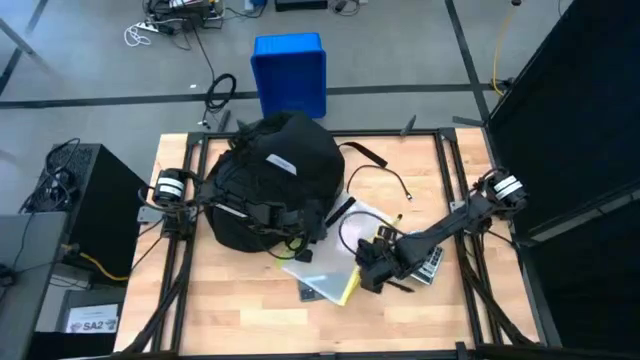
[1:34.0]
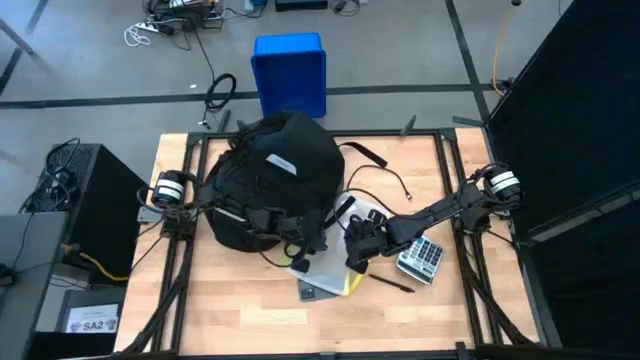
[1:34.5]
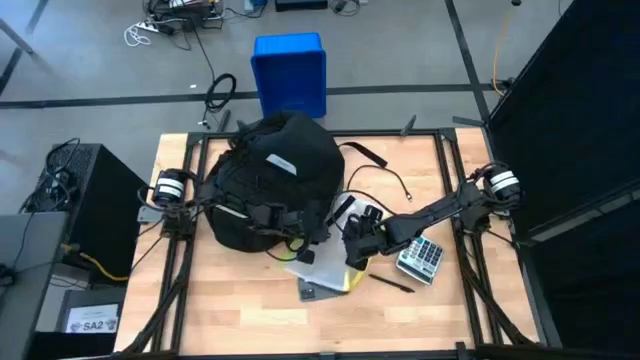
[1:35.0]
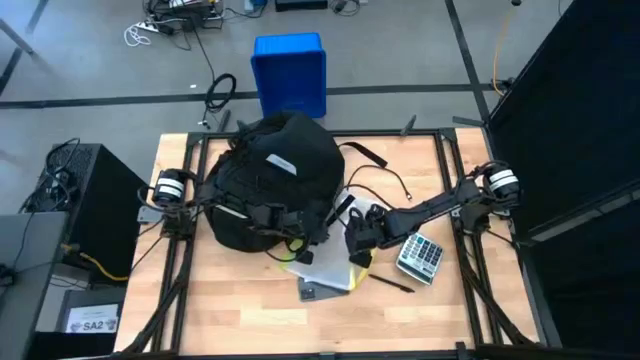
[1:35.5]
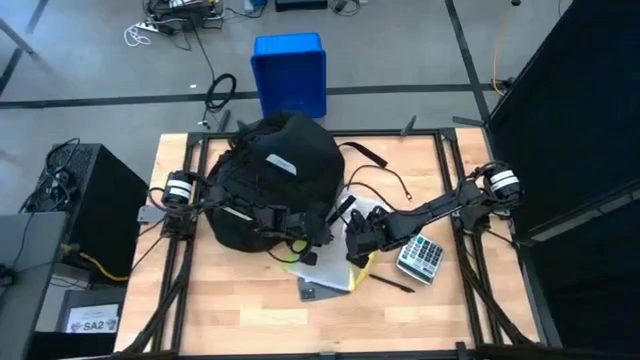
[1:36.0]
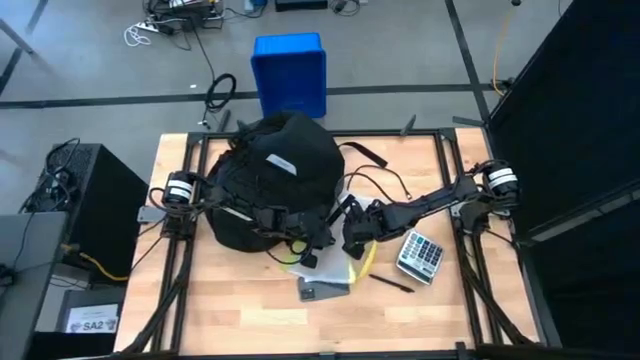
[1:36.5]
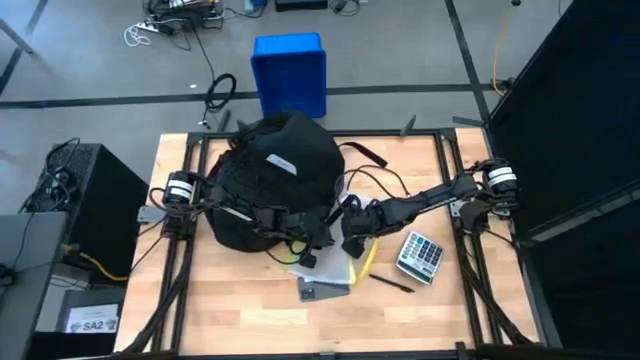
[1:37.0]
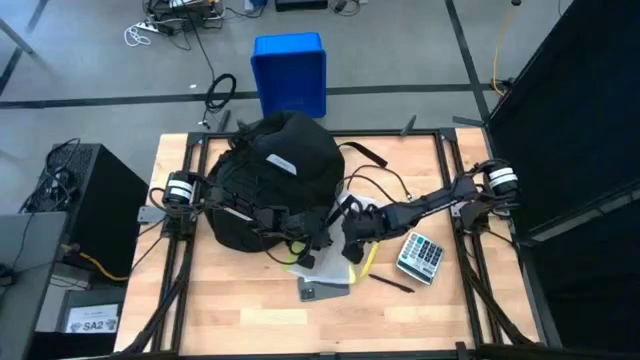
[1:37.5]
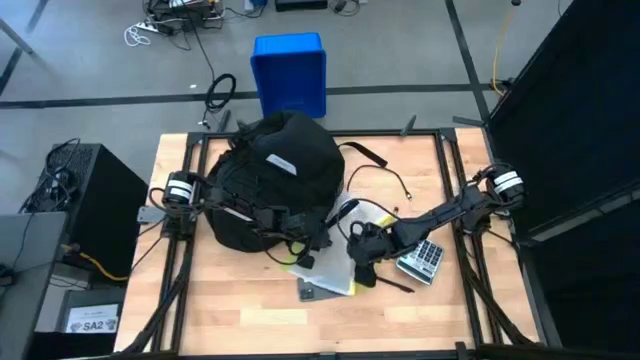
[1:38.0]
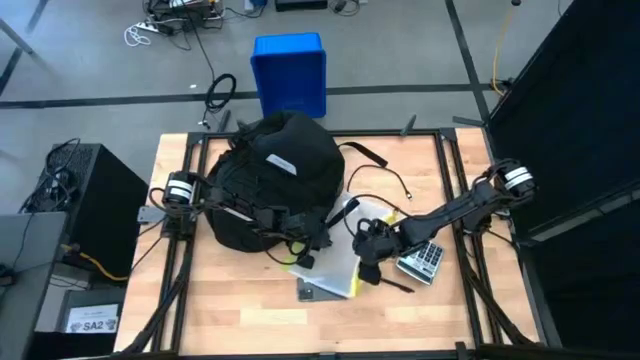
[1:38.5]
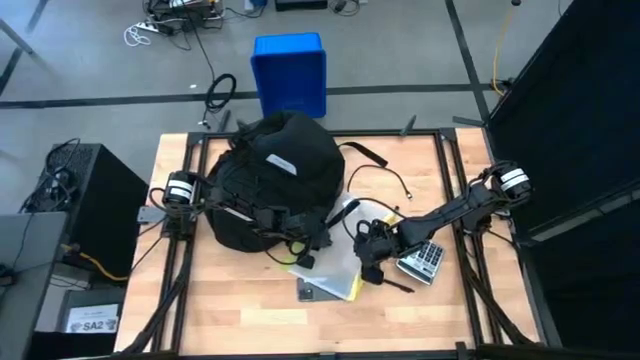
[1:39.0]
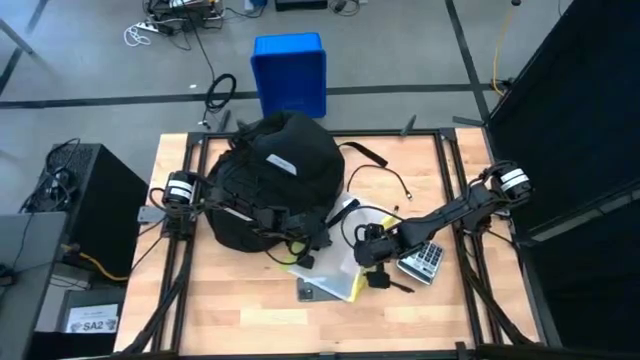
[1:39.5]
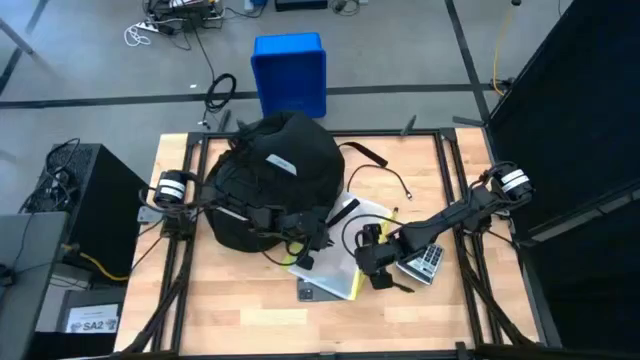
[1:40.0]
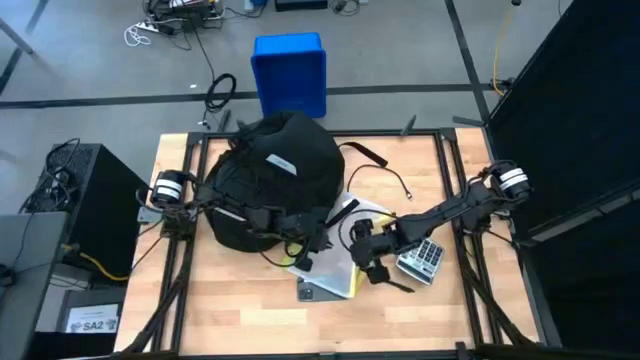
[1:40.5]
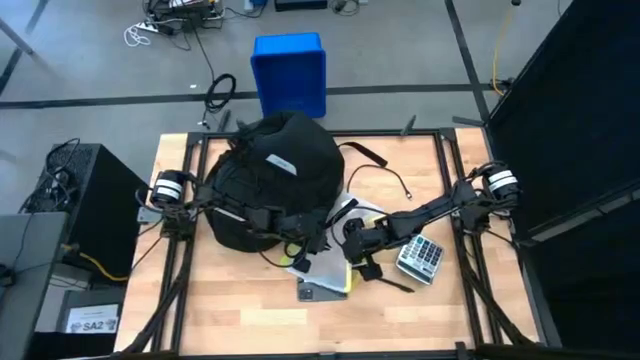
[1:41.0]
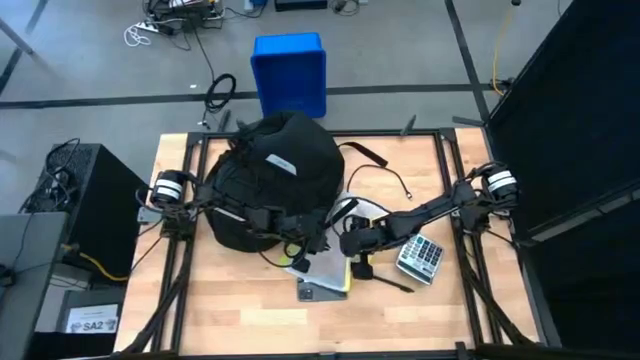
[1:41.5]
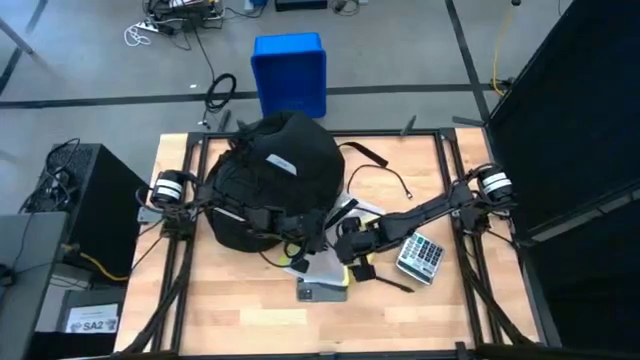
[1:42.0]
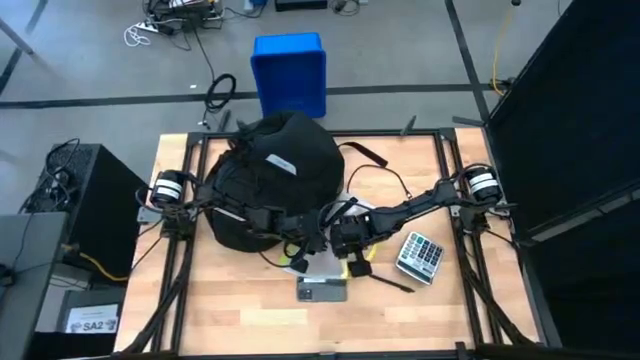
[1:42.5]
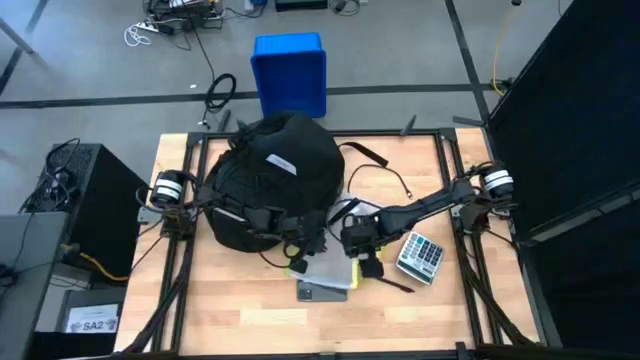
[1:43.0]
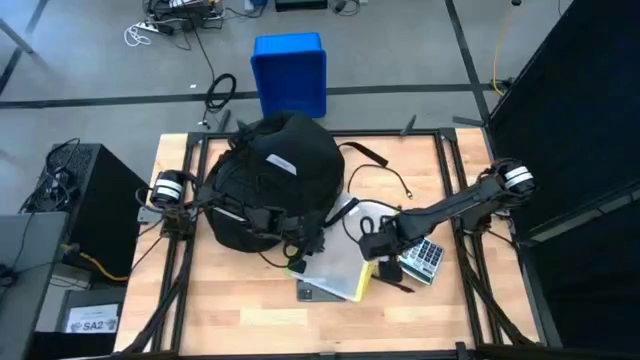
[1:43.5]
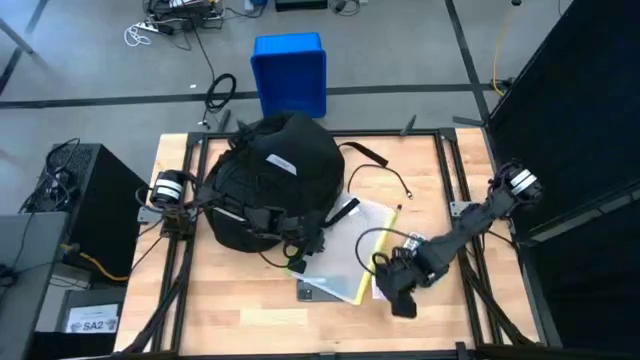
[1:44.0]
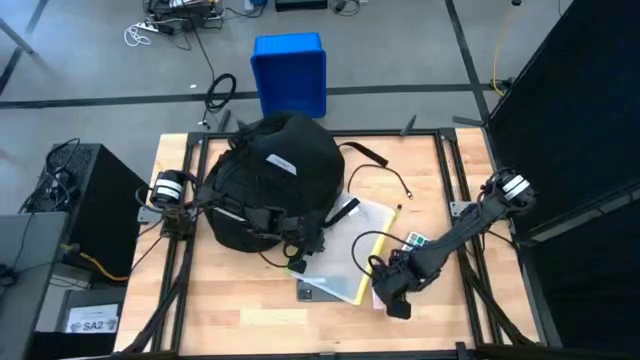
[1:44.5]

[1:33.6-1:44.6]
Task: Unpack backpack
Remove the game card from the zip bag

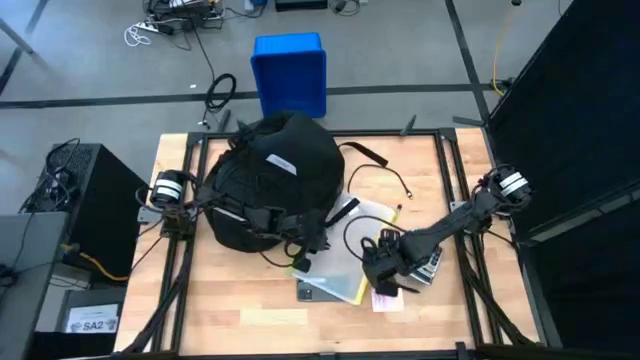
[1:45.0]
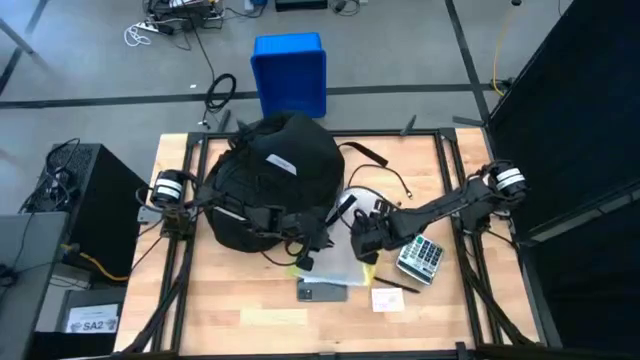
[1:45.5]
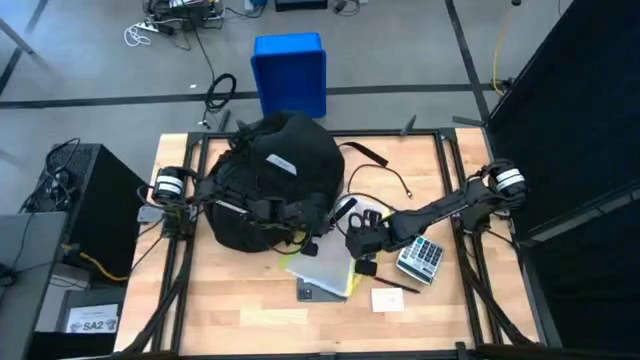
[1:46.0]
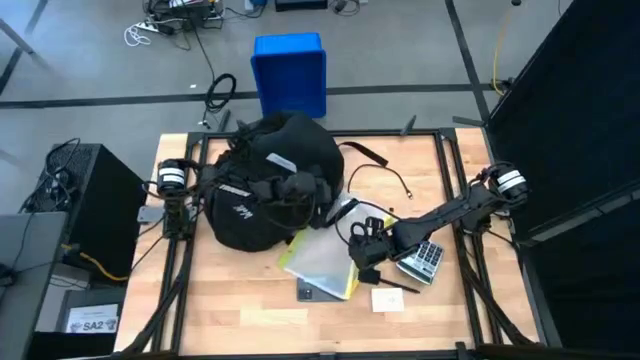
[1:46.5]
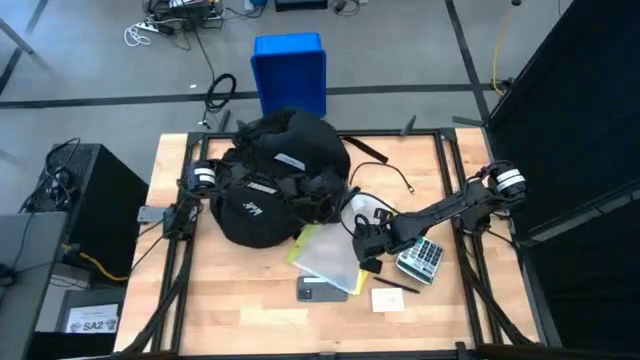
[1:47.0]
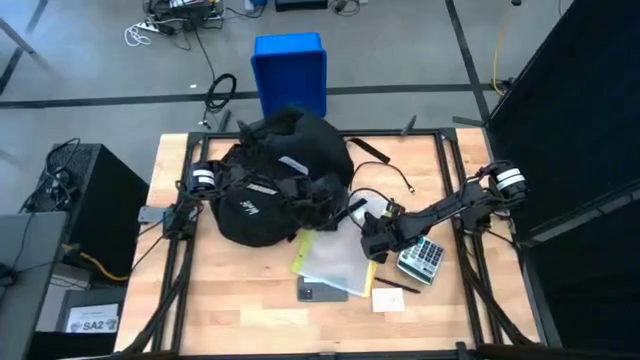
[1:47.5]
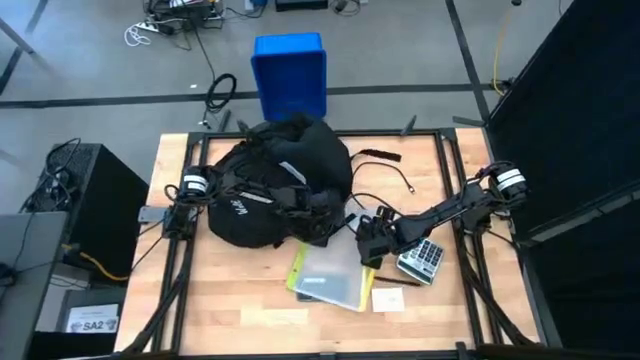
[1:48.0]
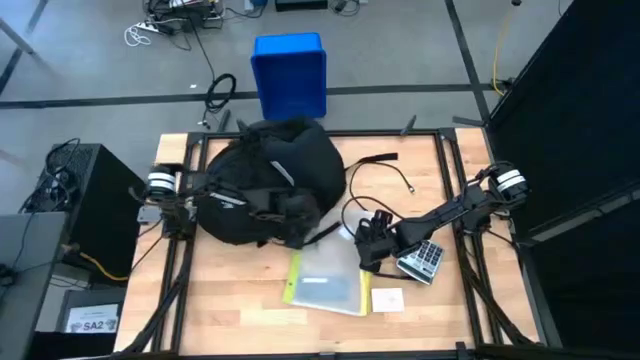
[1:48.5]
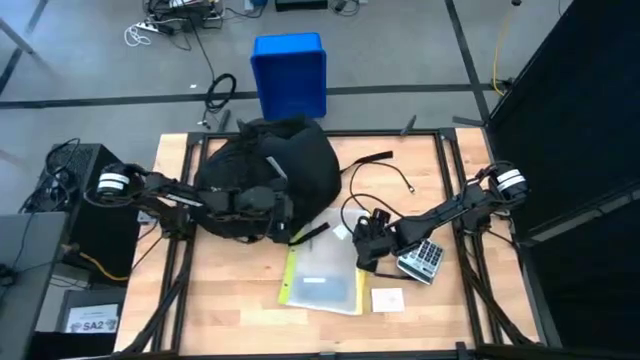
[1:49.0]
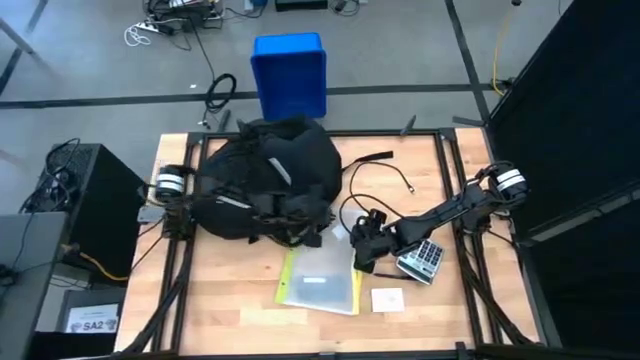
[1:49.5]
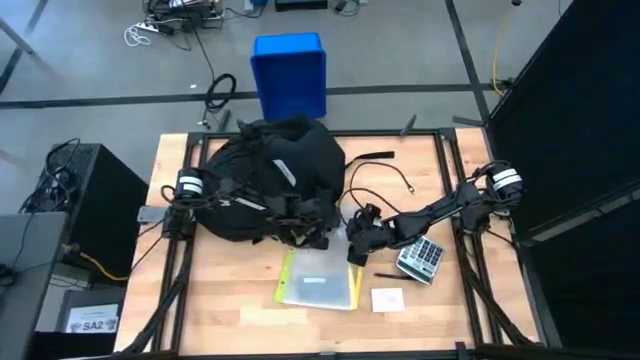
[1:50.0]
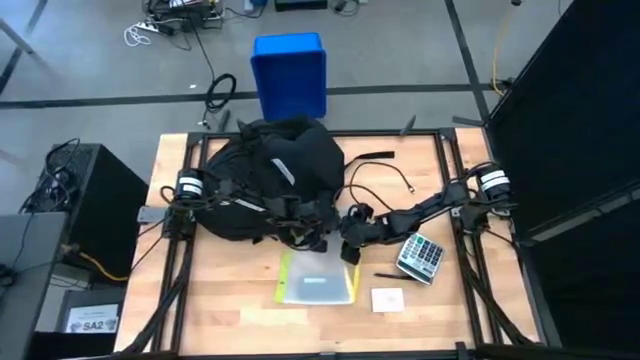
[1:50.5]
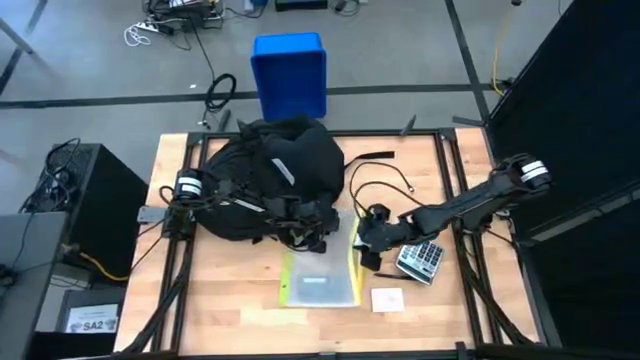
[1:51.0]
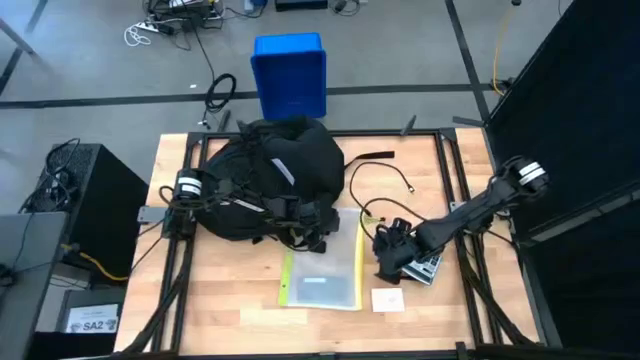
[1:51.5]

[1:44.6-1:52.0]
Remove the charger adapter from the zip bag

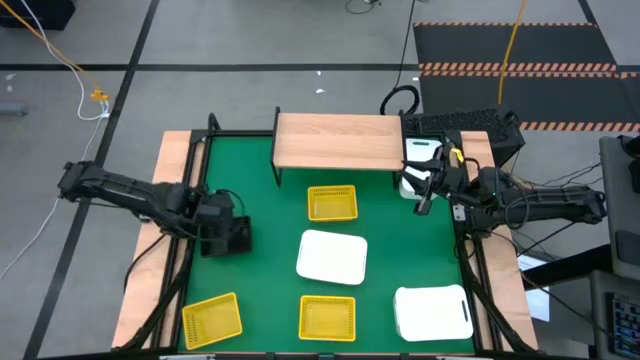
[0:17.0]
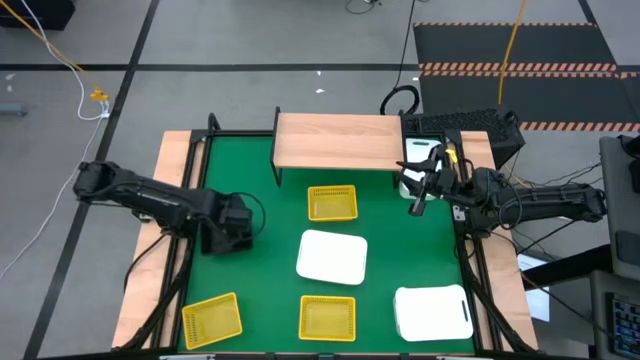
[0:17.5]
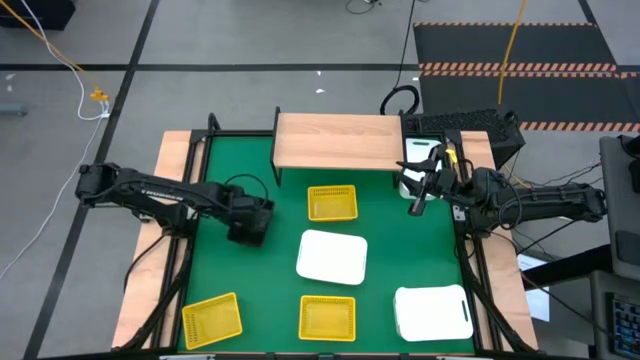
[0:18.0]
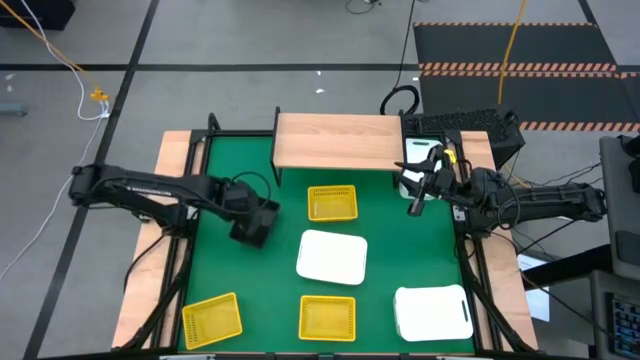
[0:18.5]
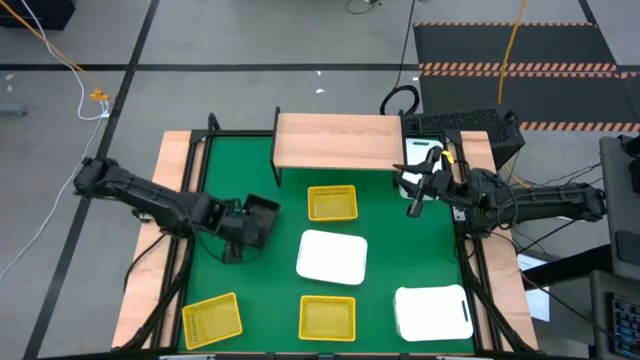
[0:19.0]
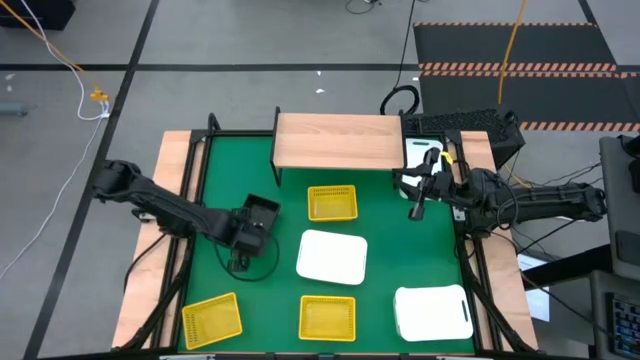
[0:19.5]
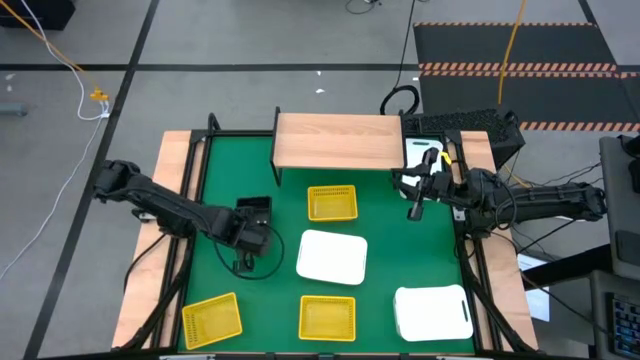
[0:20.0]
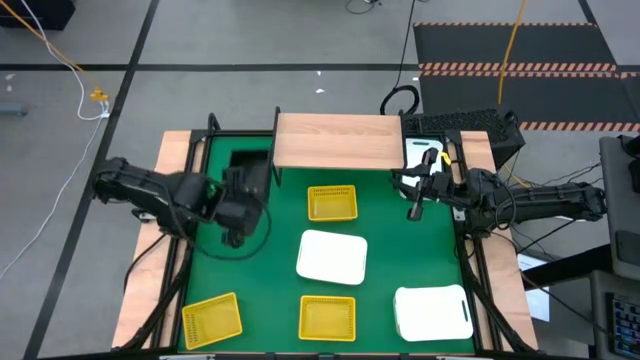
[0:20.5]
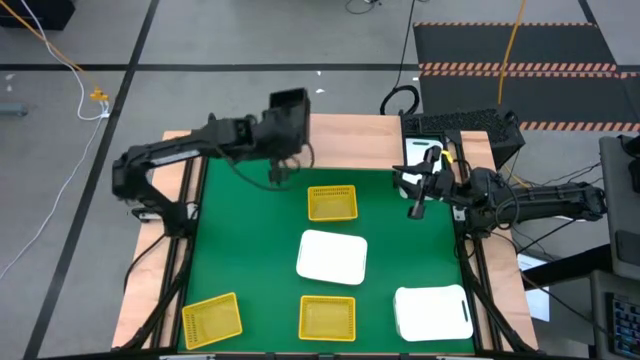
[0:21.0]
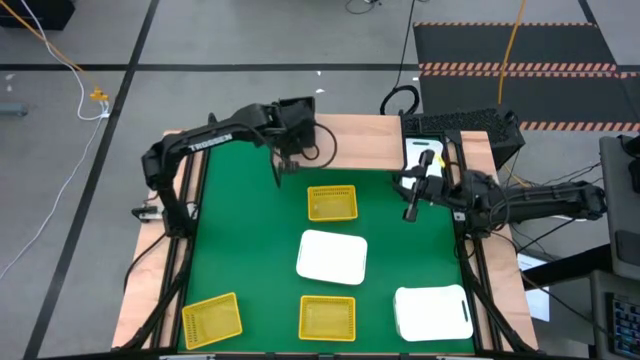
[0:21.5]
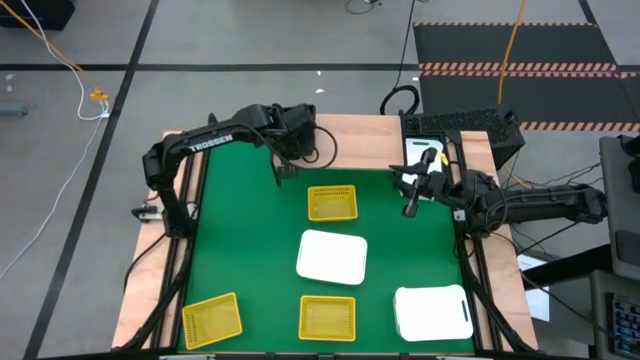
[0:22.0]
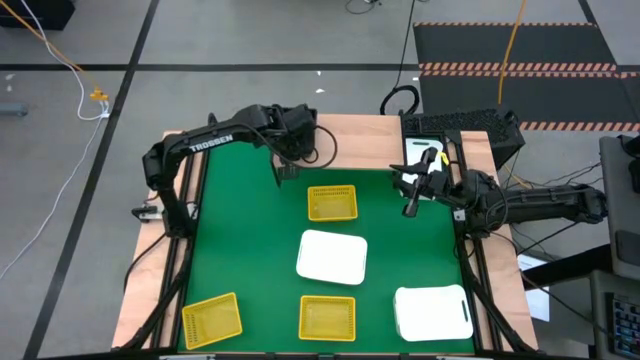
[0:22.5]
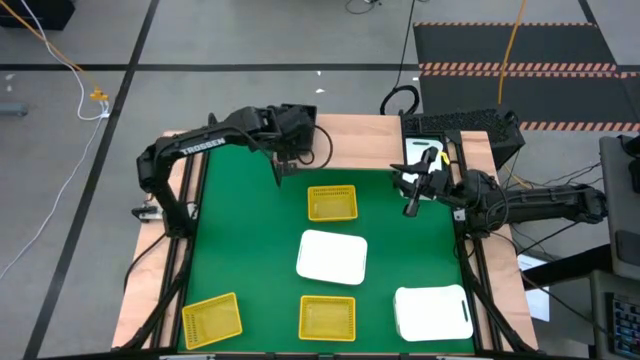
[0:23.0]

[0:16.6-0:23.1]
Task: Stack baskets on shelf by color
Put the stacked black bins on the shelf
